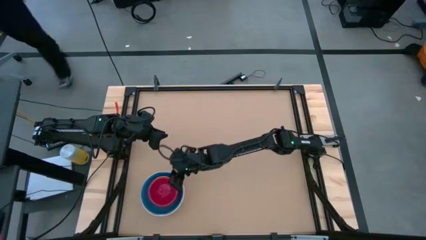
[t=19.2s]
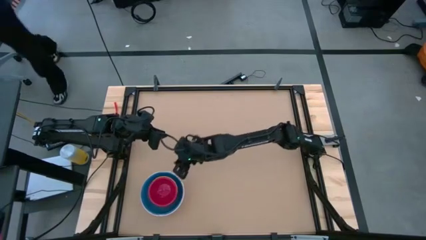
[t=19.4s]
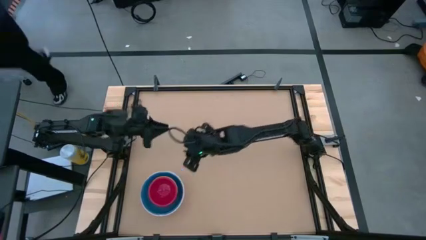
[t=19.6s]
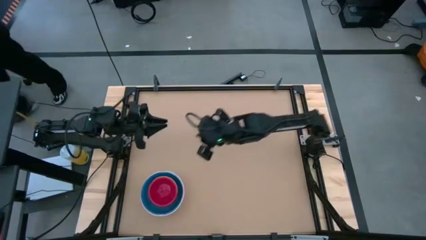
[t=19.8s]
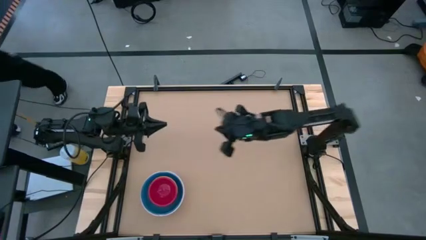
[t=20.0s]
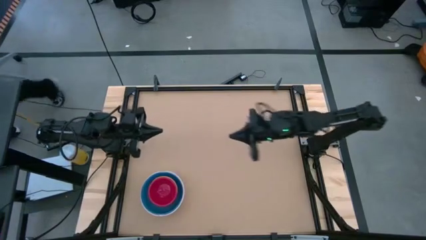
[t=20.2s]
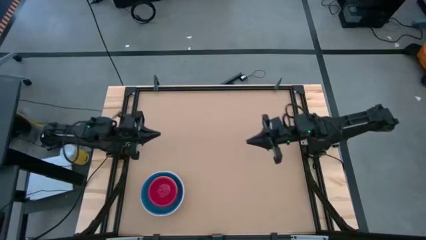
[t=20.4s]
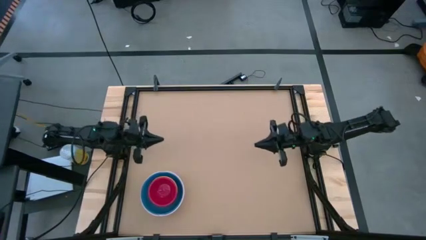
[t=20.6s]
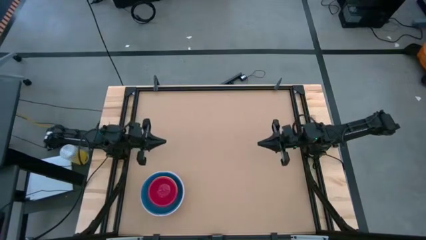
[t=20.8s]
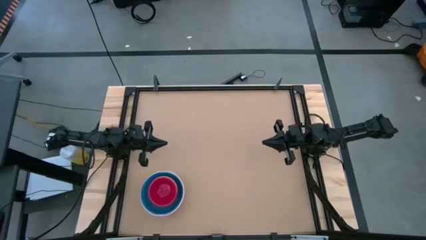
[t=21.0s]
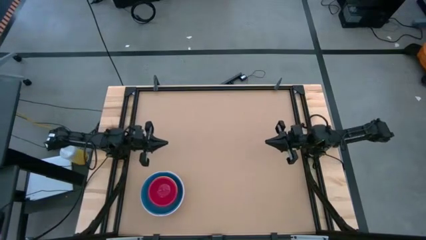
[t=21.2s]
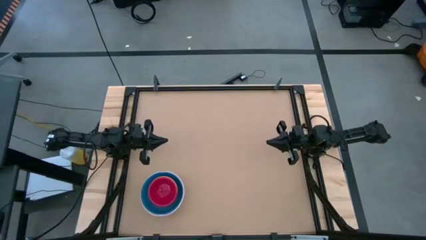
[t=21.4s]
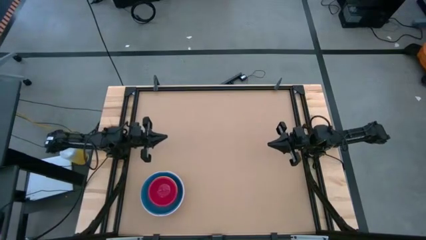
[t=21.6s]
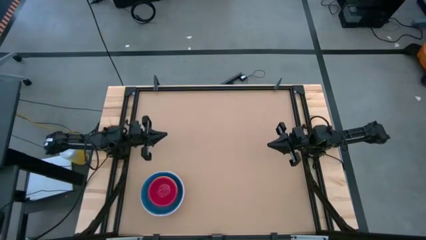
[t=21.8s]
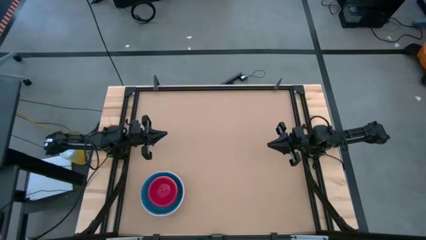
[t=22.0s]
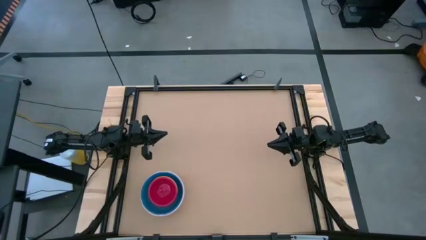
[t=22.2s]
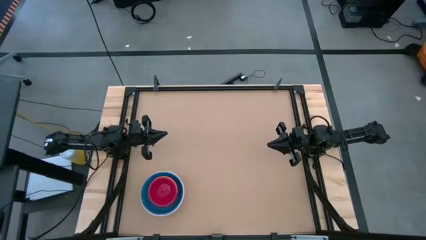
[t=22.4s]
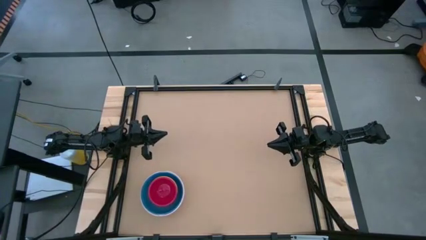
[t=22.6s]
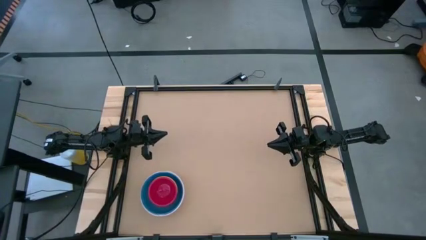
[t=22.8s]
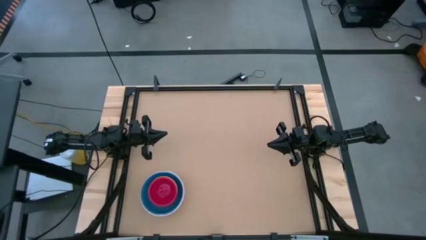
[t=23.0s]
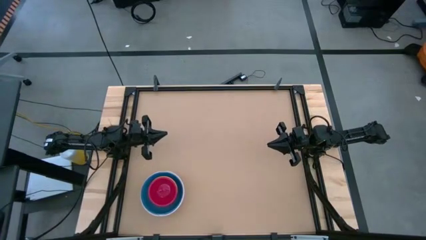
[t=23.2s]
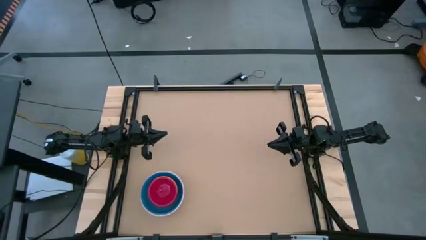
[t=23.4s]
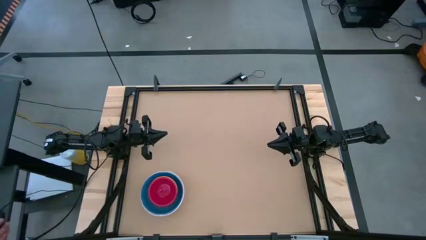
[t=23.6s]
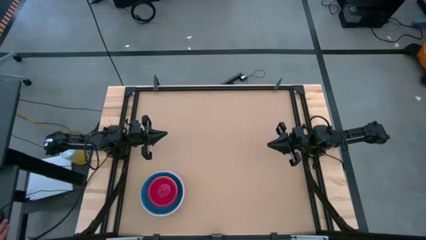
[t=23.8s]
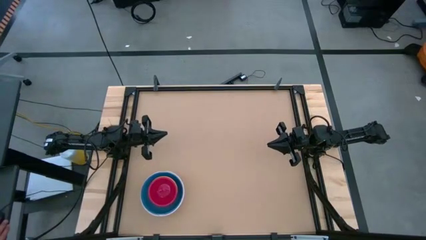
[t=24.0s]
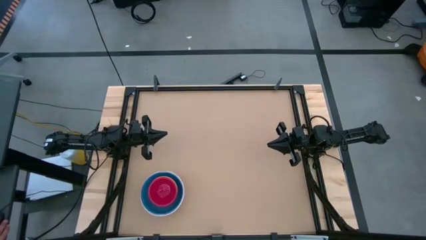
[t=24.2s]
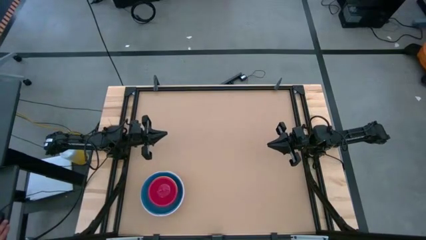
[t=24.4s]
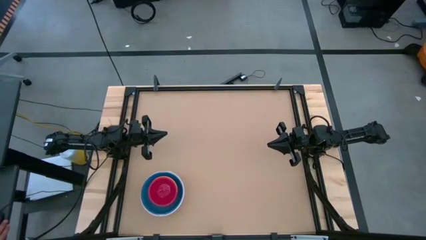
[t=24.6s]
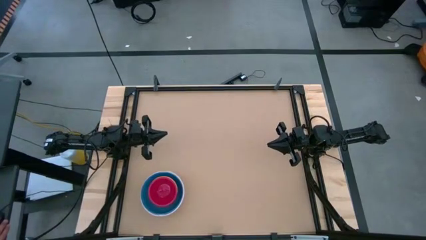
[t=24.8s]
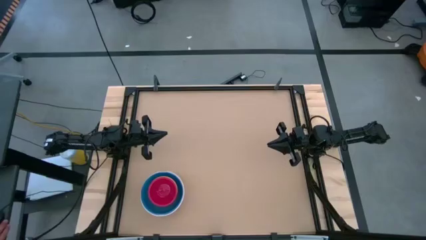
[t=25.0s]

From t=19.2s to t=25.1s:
Return to Home Position

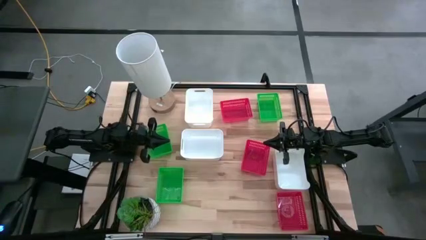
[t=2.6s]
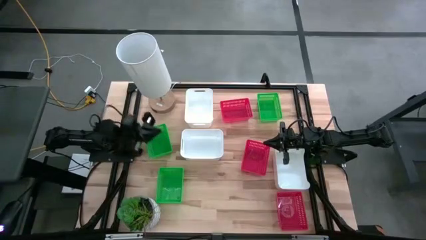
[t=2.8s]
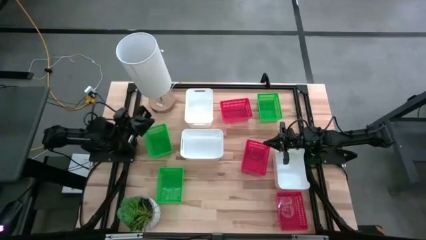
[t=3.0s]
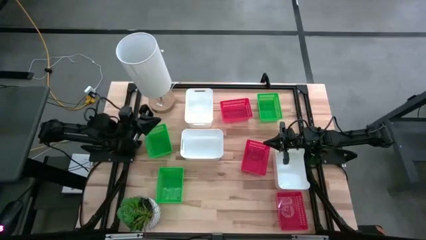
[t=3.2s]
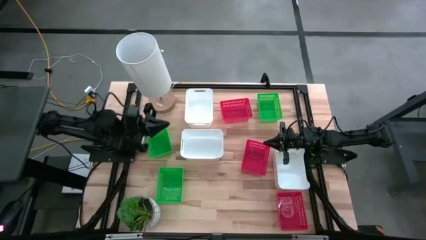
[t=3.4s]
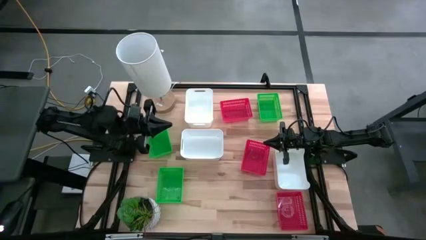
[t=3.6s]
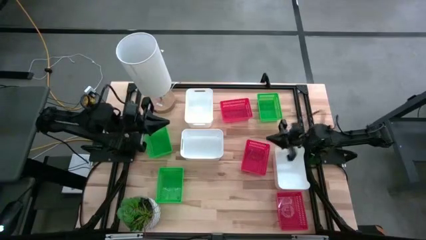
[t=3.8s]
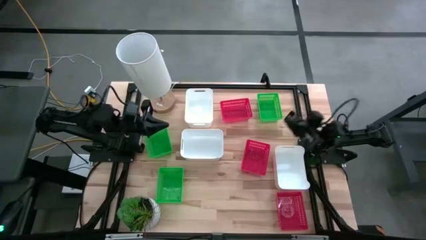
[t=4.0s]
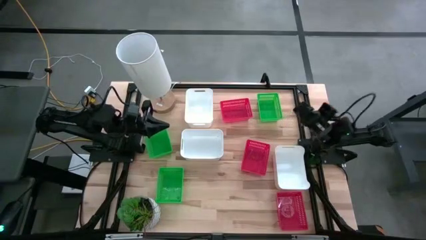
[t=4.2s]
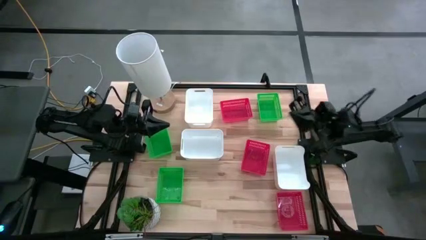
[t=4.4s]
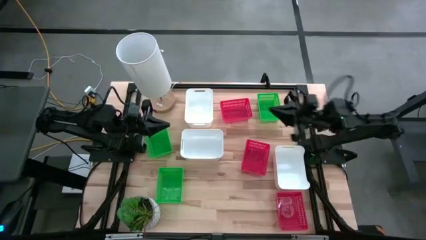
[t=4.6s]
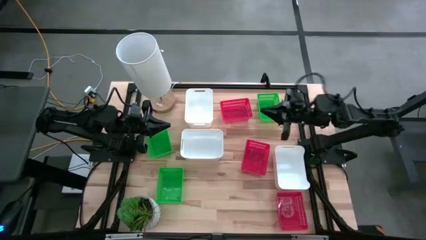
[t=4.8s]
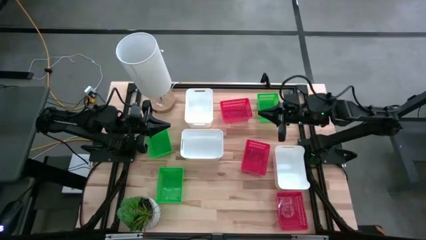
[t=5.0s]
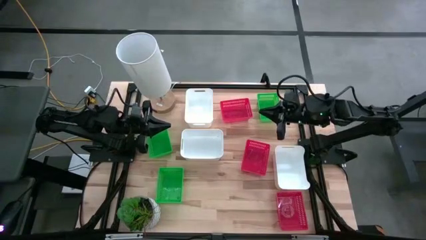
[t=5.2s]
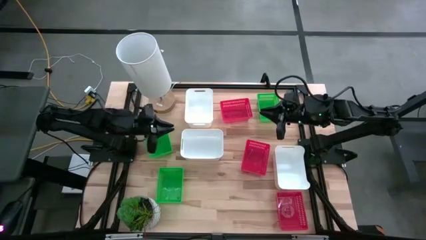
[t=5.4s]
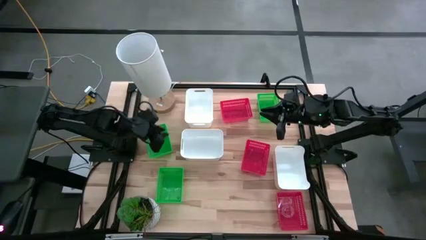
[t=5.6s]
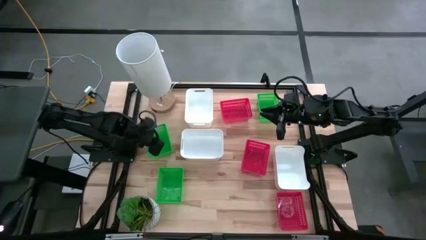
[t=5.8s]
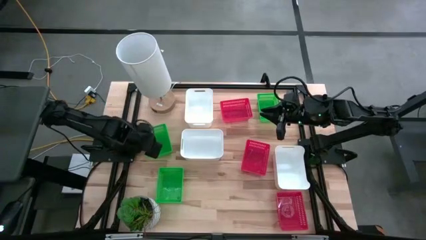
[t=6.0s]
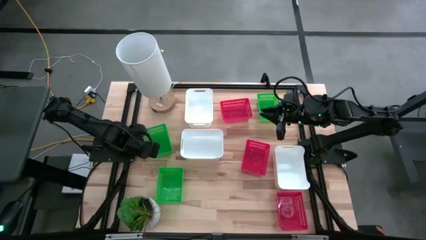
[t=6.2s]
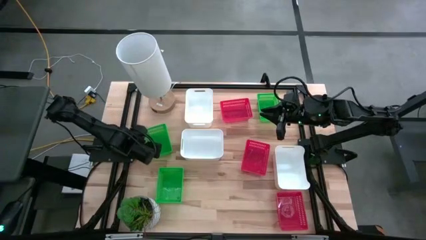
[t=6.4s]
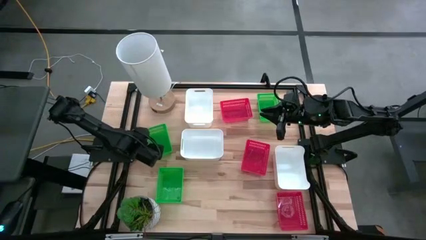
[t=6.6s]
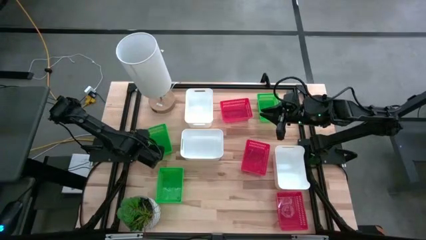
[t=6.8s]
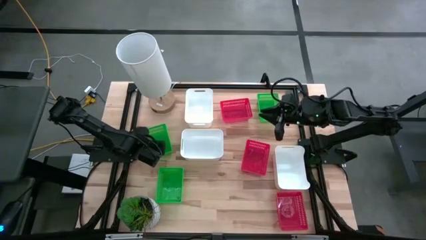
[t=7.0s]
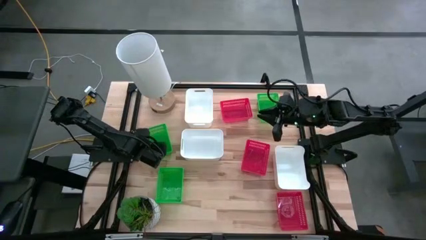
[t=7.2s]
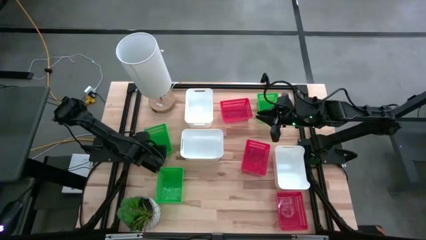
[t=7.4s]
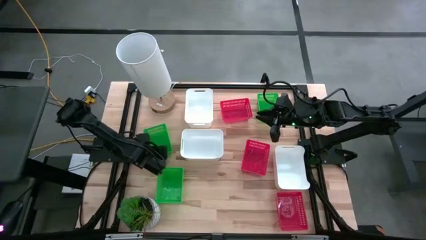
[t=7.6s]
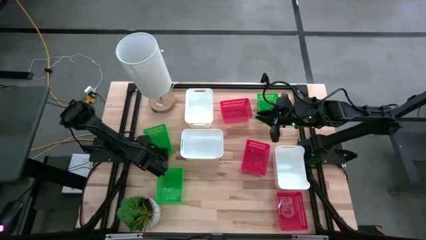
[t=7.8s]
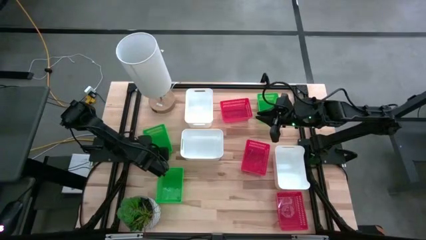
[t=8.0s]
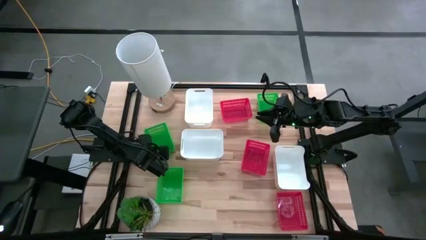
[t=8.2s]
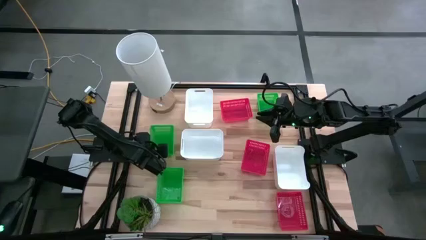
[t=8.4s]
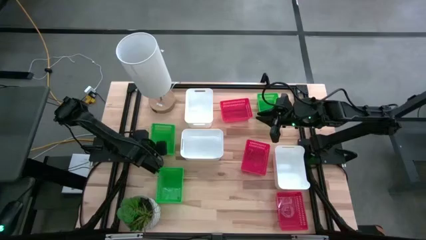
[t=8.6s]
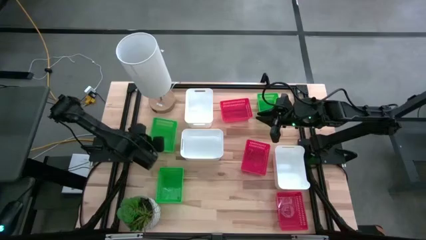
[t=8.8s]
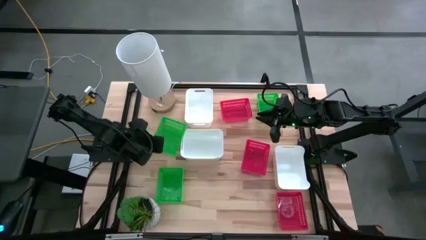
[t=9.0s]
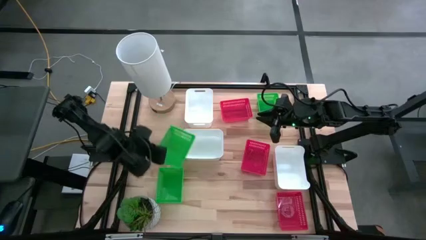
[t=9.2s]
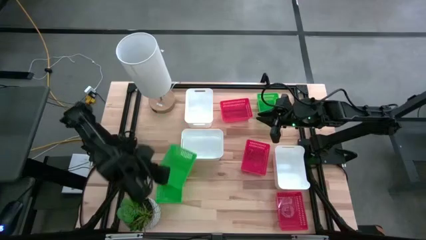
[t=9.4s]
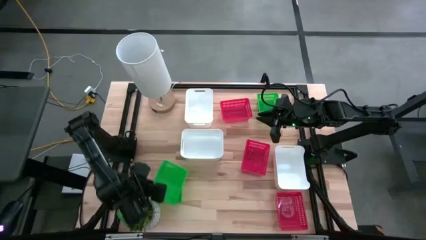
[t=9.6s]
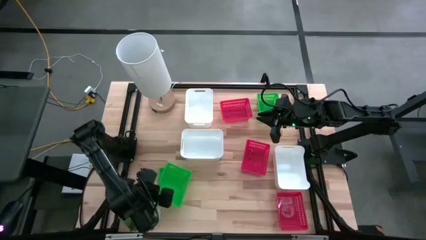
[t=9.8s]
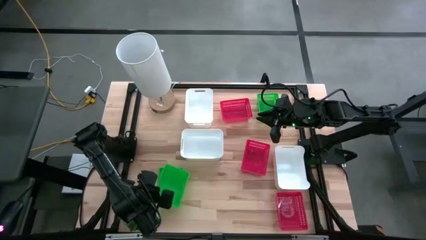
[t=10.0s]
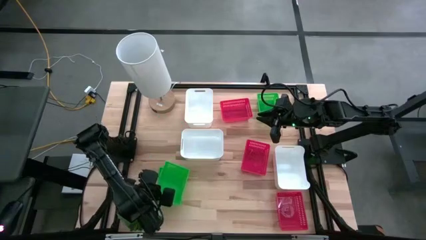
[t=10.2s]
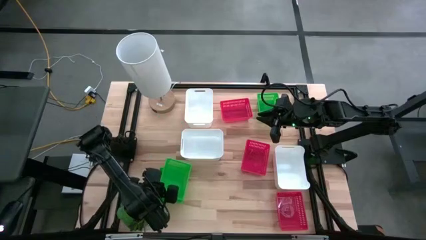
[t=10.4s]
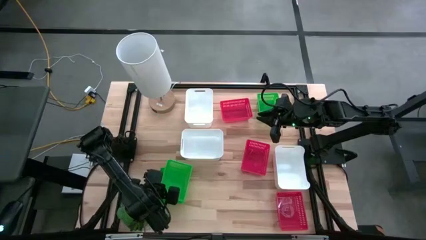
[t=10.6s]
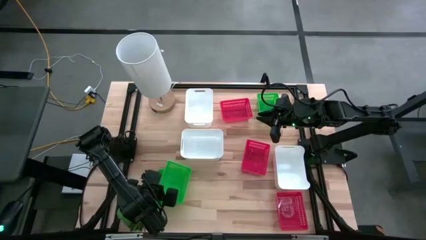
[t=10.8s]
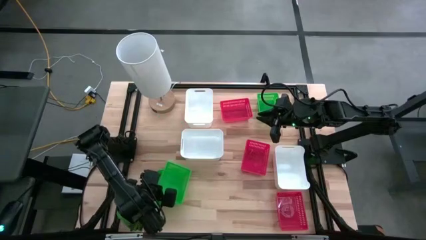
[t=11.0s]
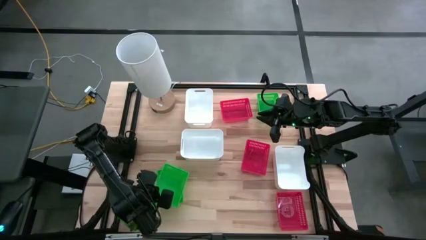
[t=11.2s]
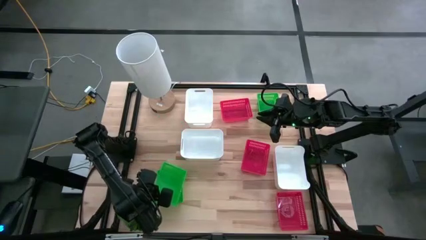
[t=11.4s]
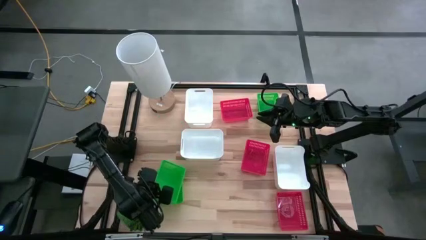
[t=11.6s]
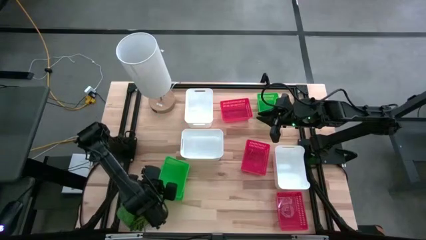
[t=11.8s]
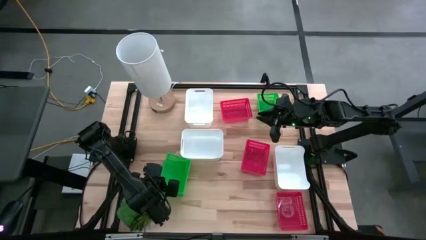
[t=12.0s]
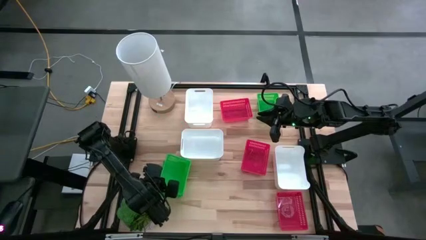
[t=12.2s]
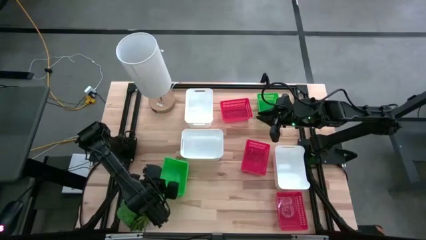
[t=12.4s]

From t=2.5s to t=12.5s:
Stack the middle left green bin on the bottom green bin
